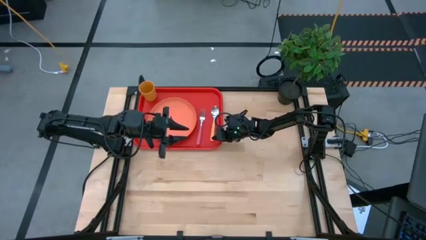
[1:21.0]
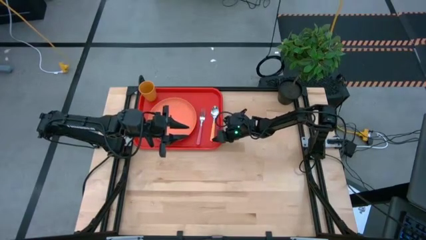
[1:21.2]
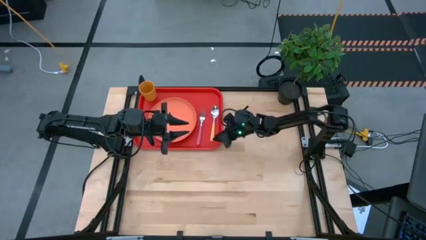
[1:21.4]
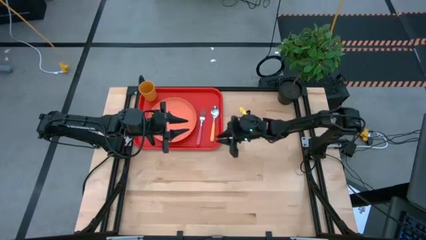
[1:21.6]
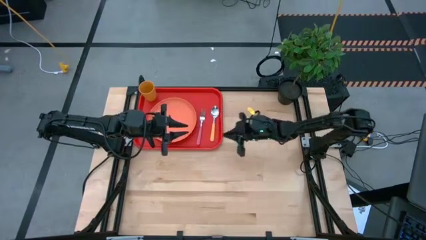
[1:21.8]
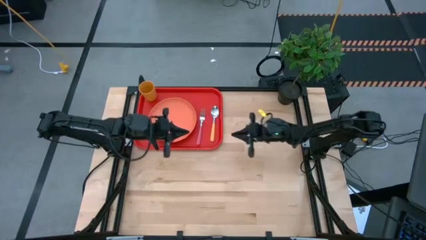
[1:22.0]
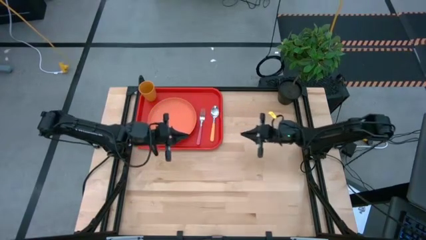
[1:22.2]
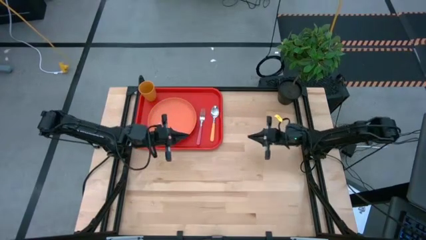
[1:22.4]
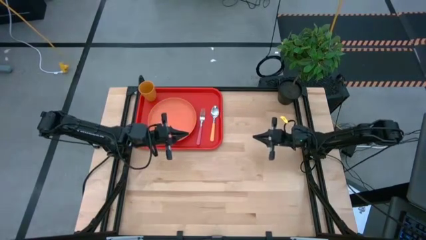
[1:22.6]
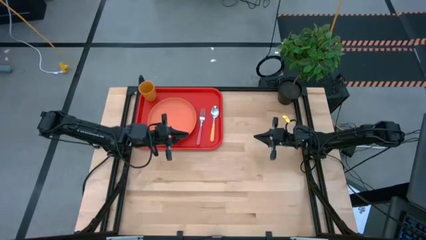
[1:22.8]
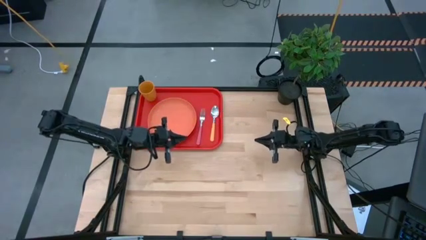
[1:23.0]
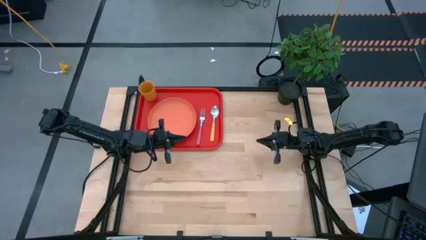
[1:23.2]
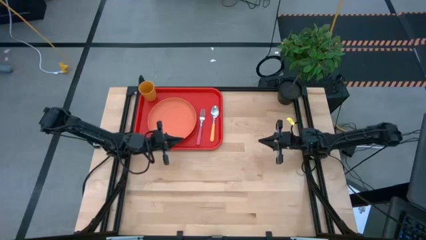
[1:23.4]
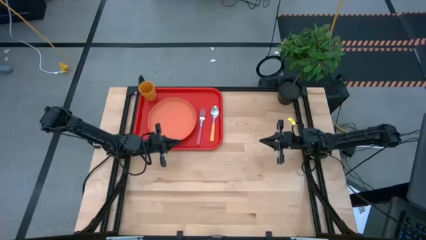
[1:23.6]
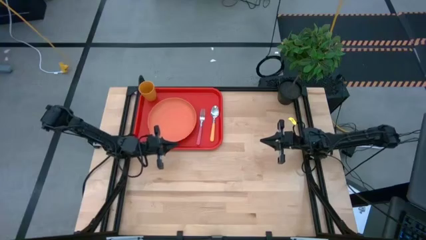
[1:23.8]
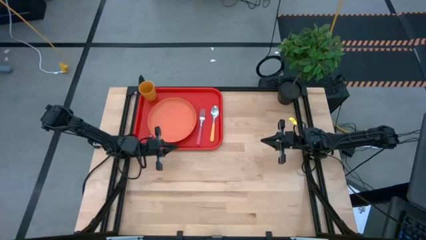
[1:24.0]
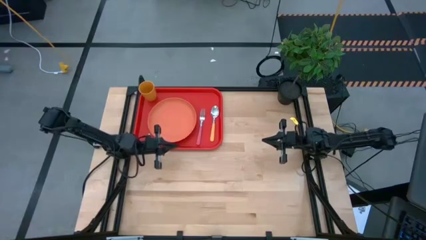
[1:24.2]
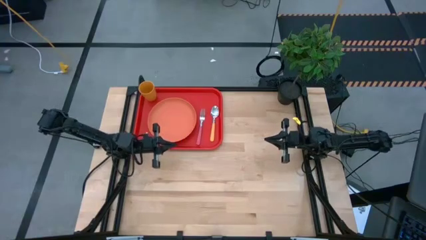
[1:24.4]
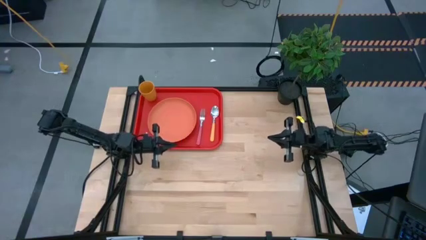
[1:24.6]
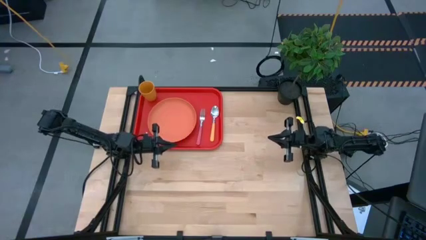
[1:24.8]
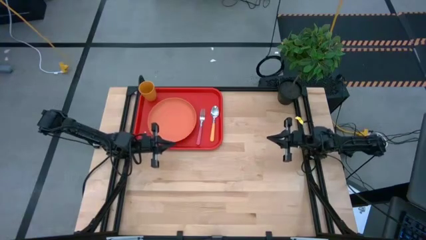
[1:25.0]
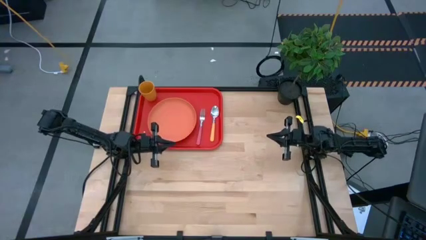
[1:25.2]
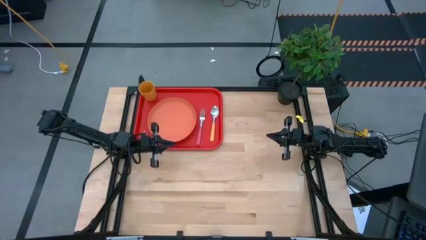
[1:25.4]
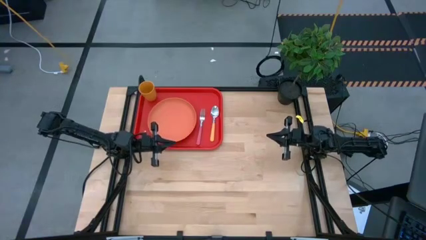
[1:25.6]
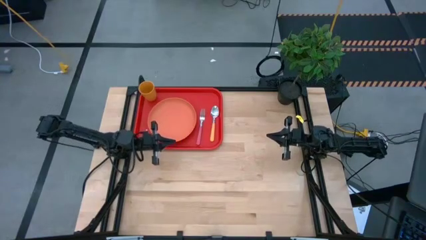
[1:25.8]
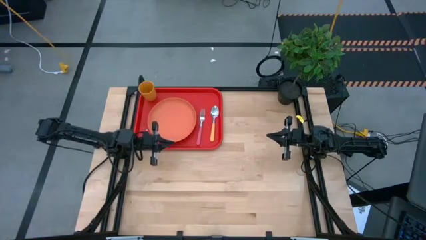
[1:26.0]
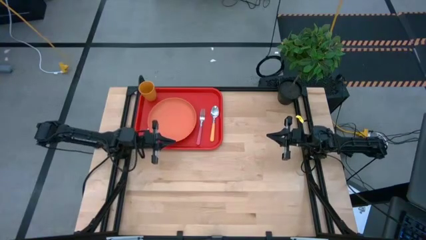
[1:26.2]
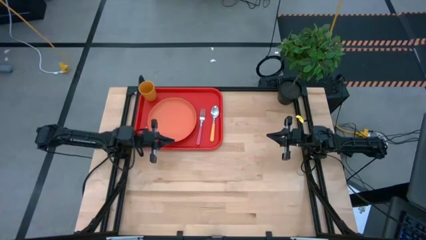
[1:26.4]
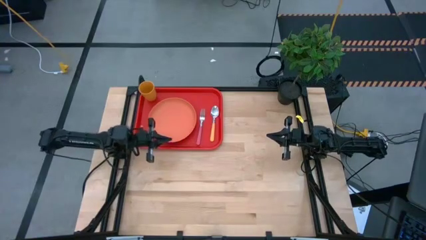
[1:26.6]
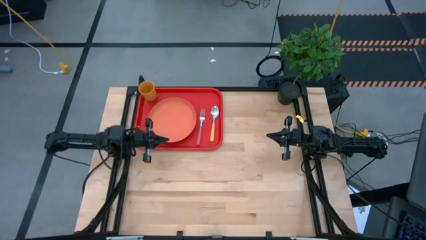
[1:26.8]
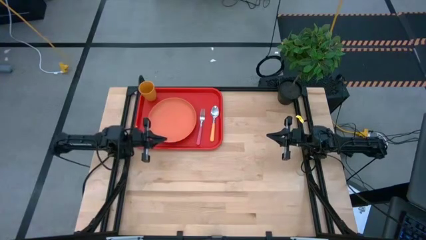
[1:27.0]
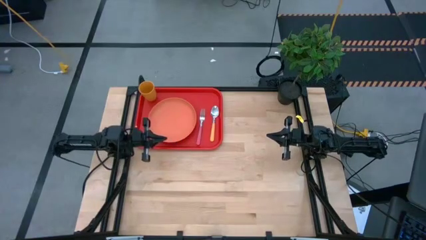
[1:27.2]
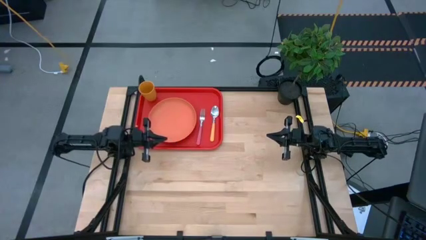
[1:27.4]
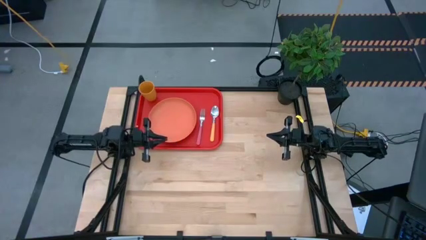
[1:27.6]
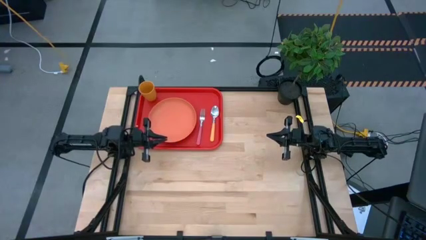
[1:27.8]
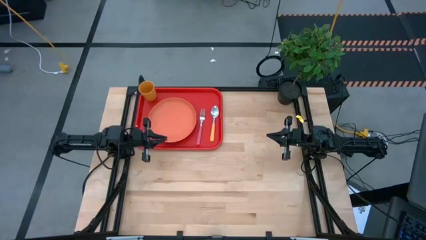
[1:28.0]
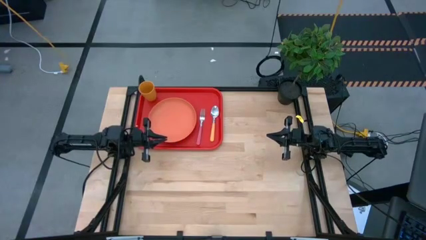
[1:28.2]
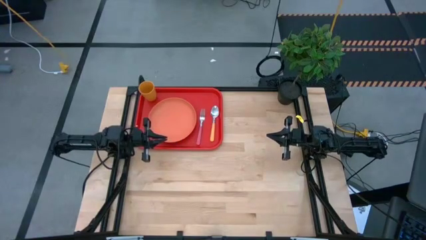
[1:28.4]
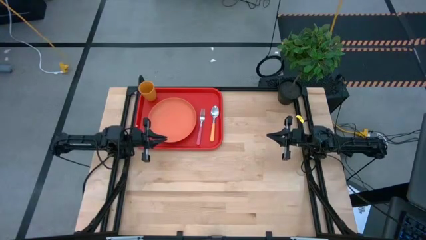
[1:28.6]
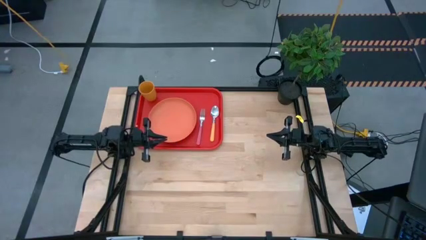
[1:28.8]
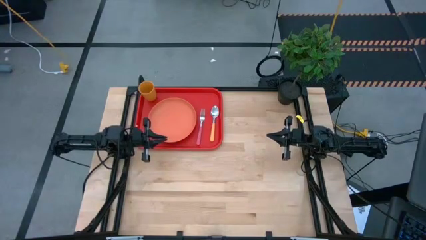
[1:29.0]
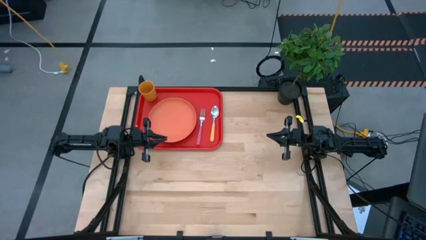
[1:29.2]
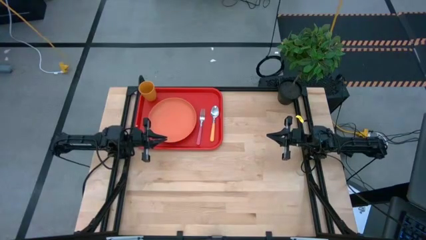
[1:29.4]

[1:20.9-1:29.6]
Task: Pick and place plate/cup/fork/spoon on tray
Return to Home Position

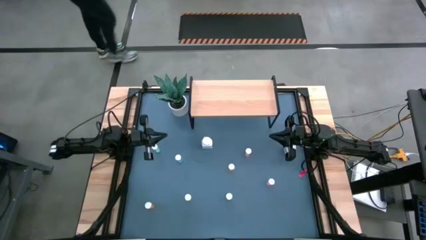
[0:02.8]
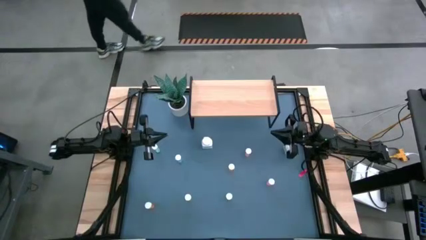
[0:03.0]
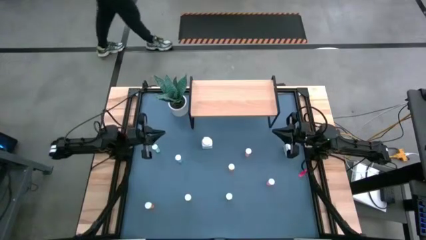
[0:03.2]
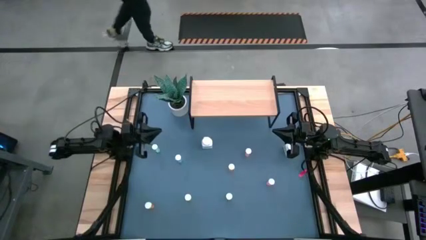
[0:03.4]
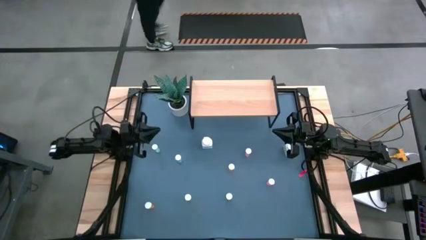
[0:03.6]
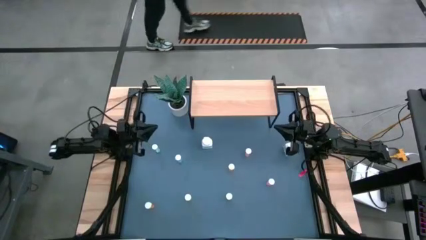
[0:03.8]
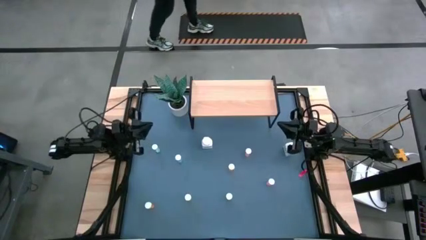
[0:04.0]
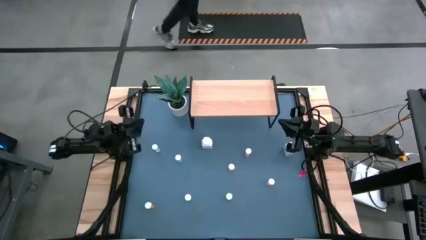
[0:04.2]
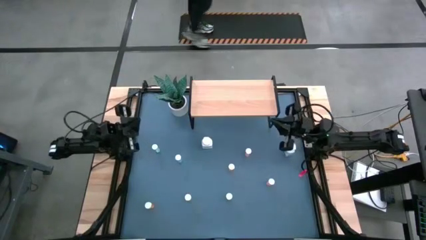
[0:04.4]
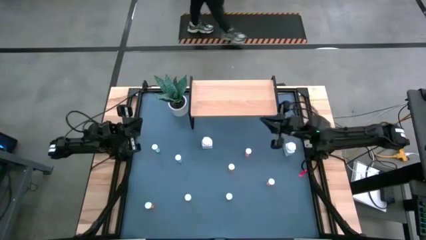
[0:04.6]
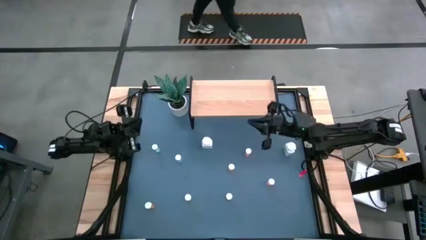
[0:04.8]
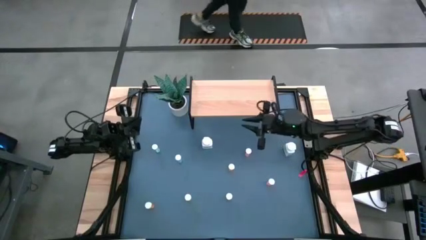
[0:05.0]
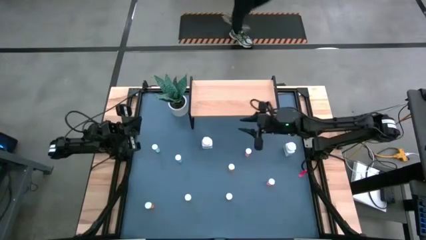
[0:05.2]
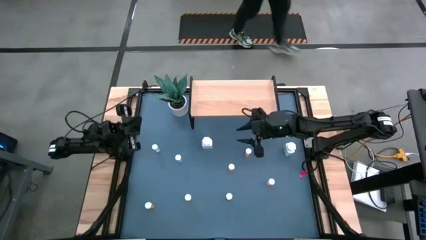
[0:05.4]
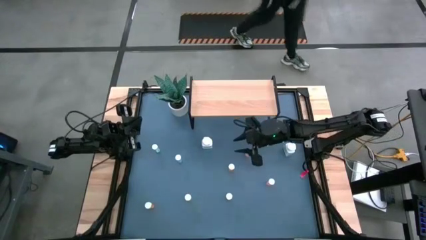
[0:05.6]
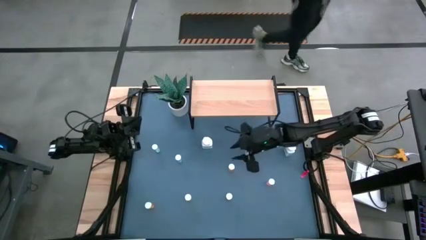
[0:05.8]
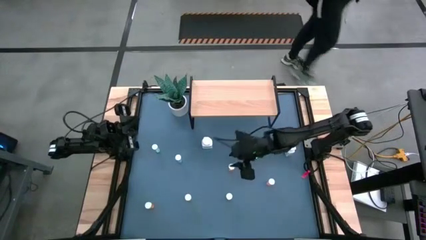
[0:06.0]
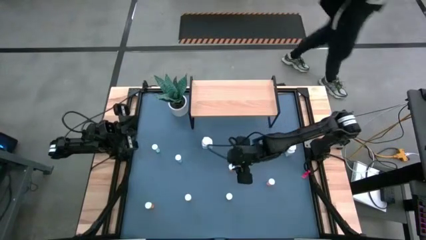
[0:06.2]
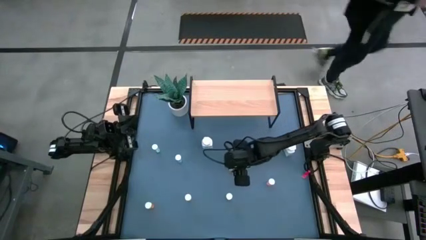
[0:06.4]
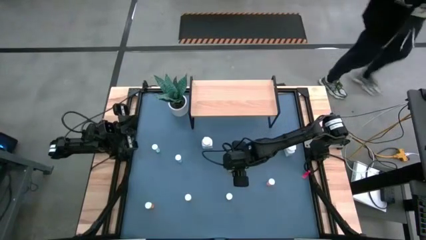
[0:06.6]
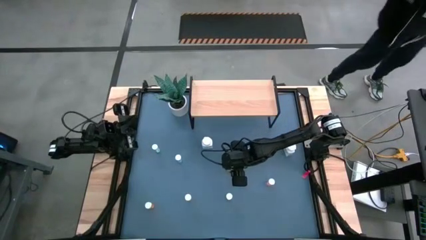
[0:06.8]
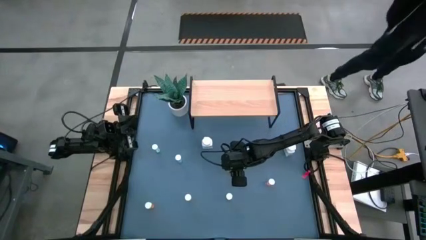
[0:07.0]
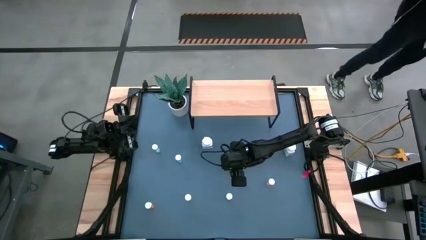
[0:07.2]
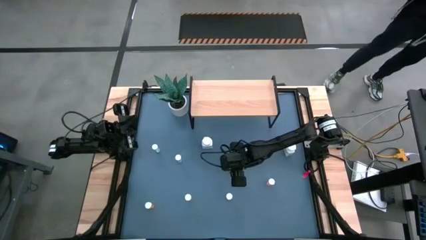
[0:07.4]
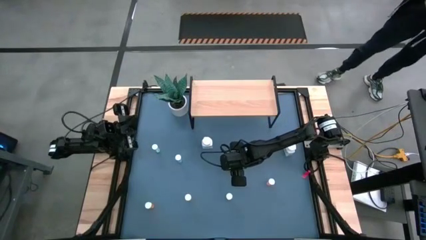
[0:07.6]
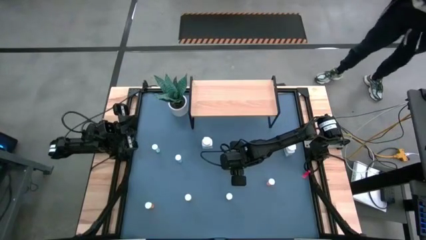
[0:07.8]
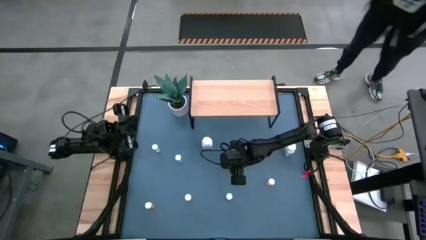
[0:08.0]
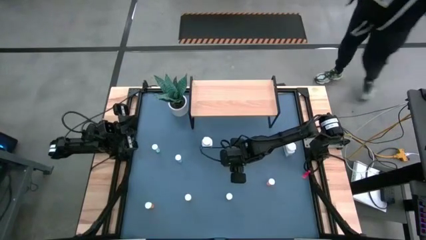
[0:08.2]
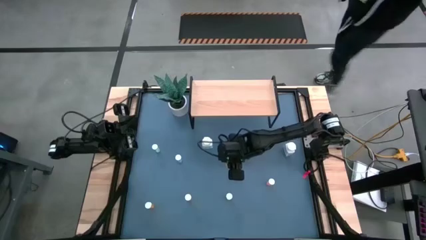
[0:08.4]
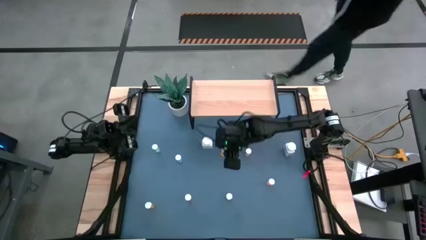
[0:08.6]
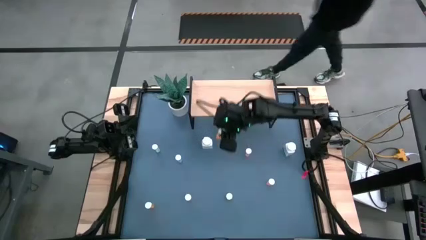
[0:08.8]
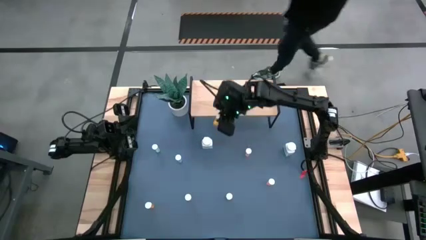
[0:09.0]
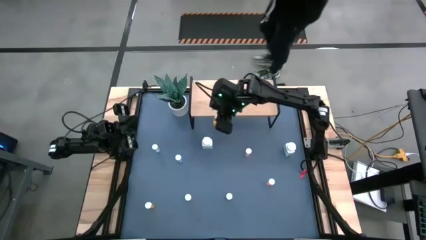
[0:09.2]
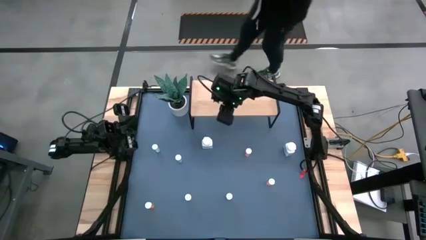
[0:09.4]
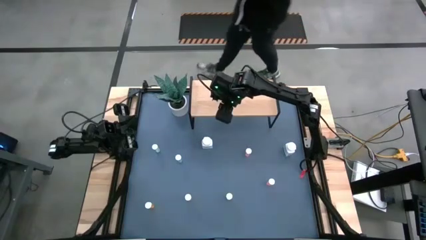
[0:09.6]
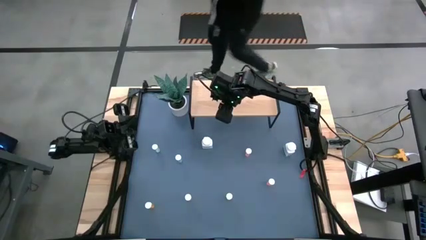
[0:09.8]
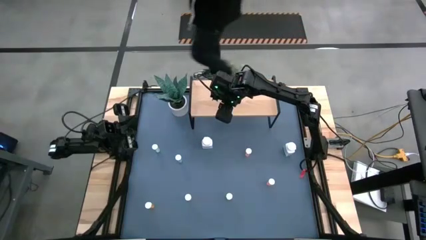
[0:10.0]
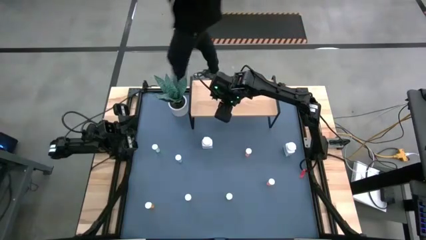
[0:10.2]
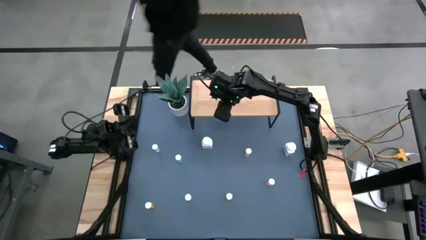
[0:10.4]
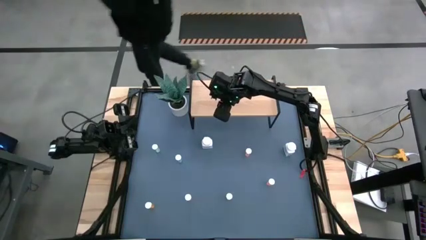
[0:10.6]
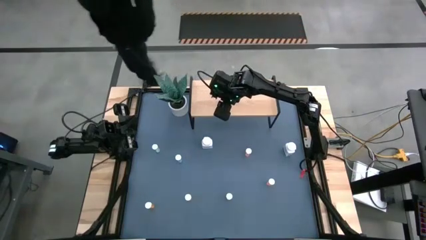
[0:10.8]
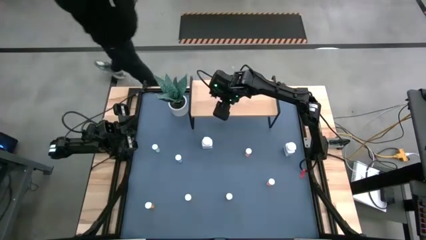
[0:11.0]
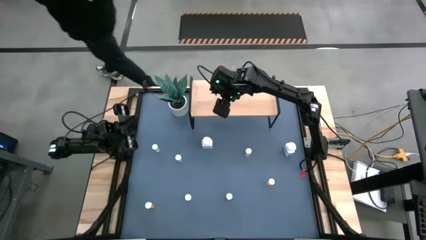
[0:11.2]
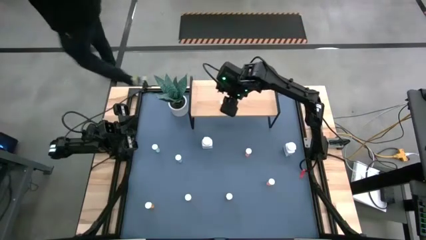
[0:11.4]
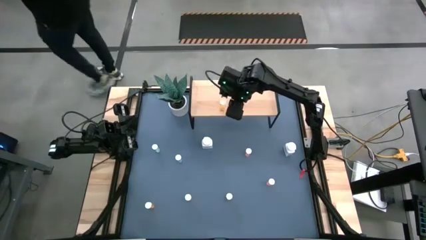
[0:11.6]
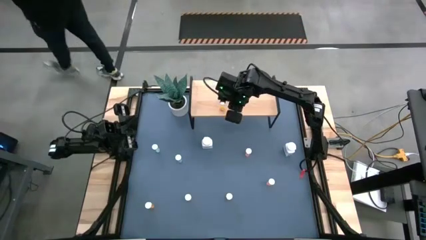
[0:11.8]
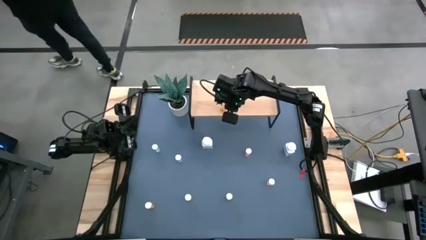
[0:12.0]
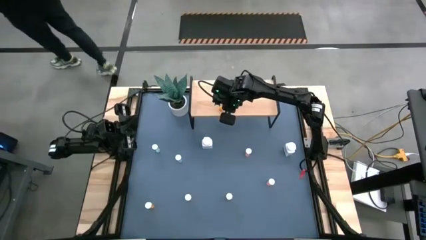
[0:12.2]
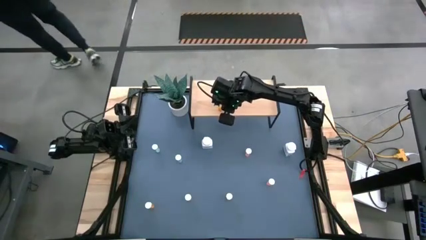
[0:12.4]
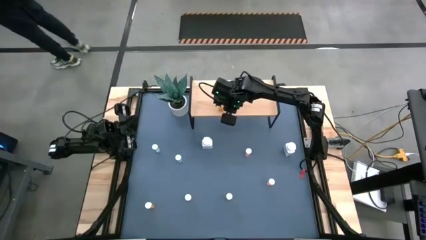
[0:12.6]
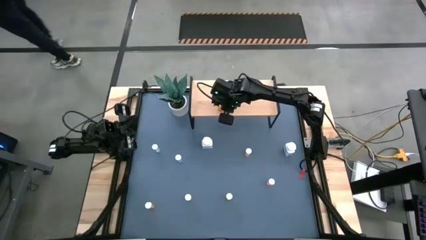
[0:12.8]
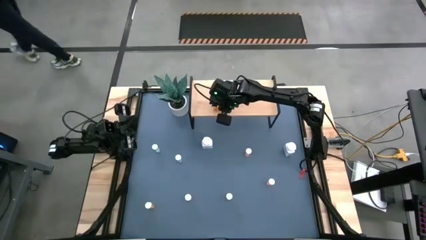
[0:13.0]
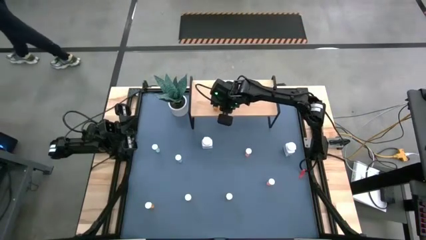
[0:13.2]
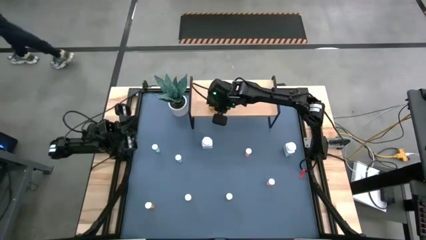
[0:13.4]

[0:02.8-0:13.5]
Task: Pick and place medicine bottles onto shelf by color
Put the right orange medicine bottle on the shelf
